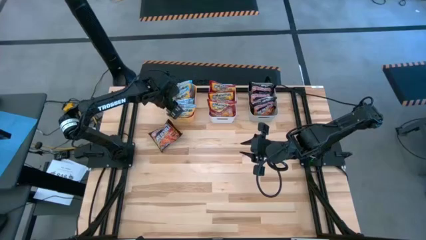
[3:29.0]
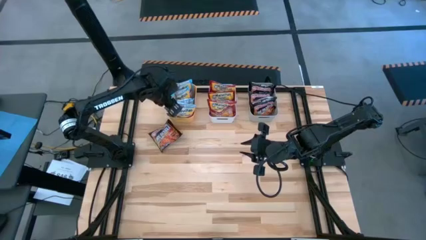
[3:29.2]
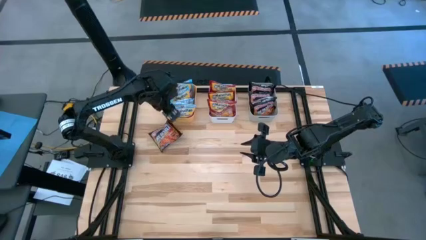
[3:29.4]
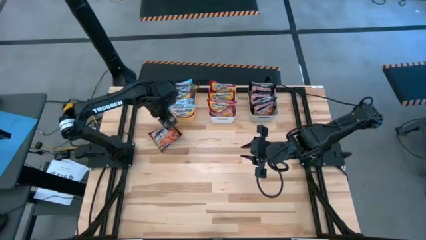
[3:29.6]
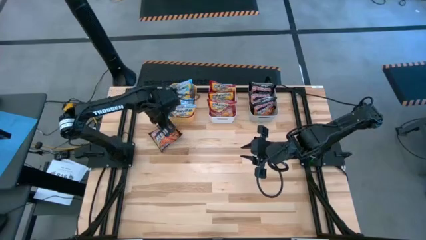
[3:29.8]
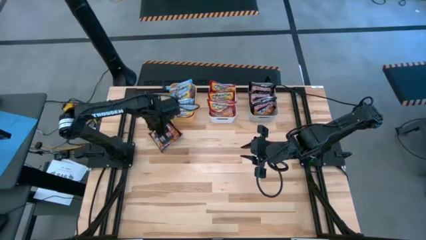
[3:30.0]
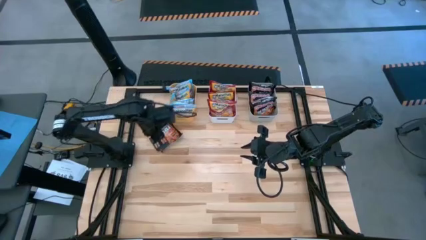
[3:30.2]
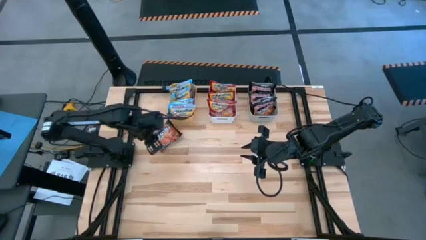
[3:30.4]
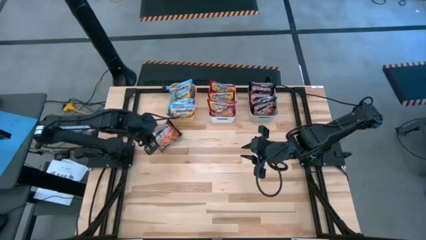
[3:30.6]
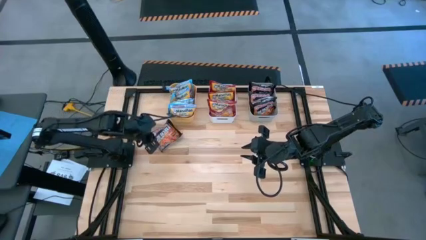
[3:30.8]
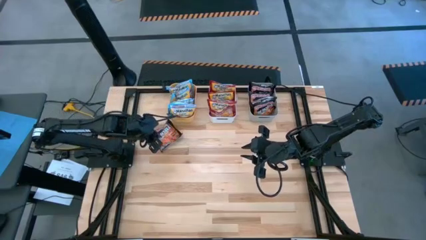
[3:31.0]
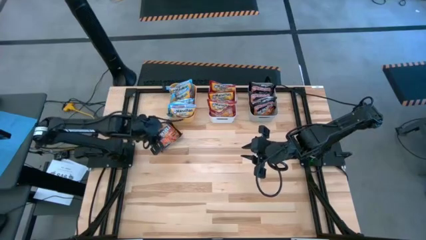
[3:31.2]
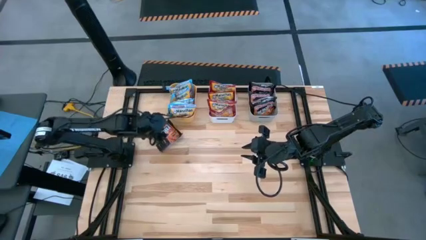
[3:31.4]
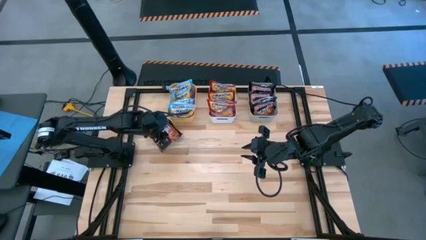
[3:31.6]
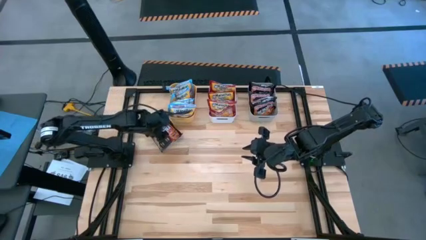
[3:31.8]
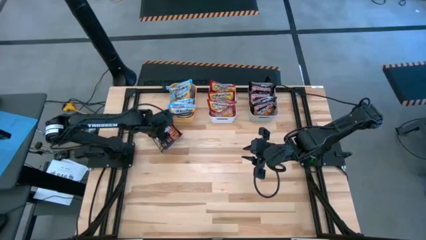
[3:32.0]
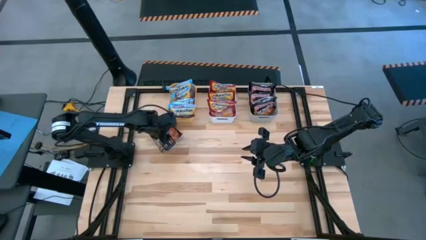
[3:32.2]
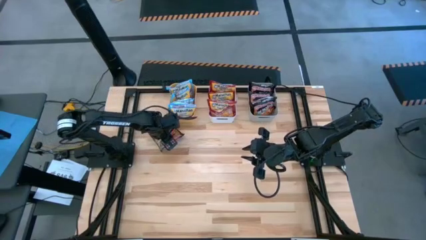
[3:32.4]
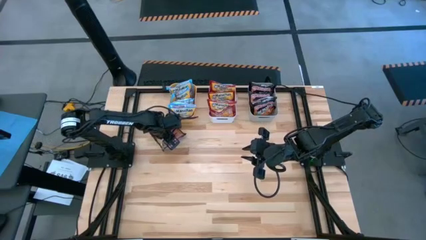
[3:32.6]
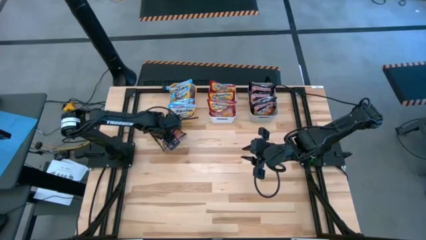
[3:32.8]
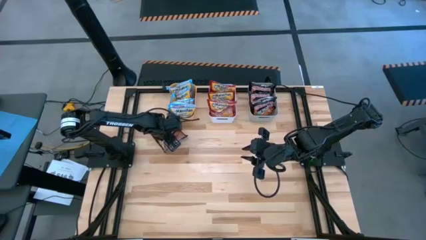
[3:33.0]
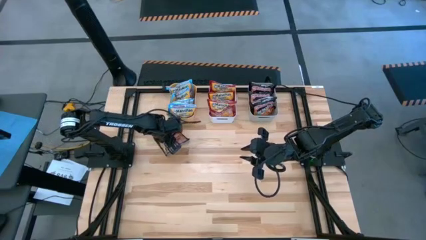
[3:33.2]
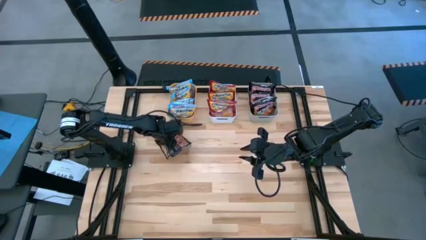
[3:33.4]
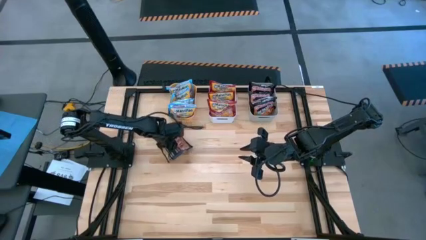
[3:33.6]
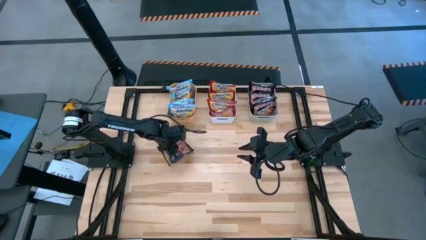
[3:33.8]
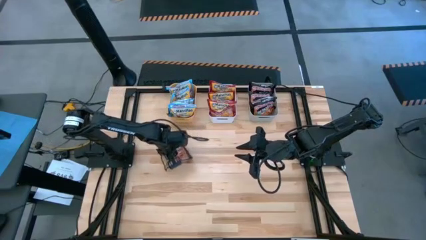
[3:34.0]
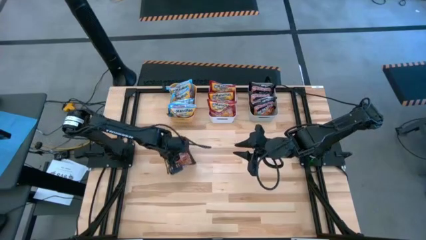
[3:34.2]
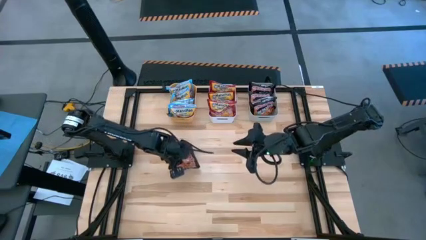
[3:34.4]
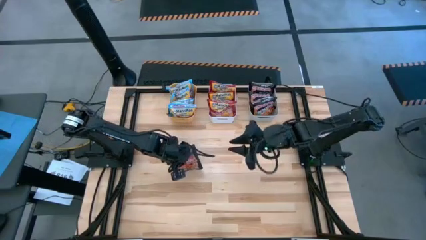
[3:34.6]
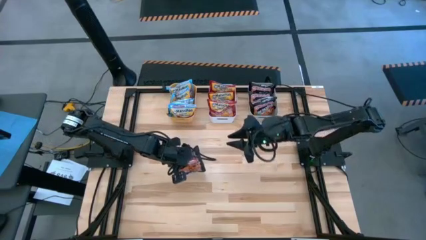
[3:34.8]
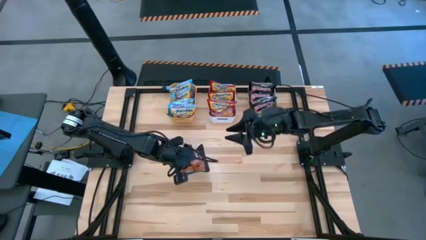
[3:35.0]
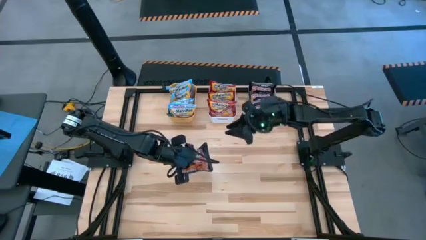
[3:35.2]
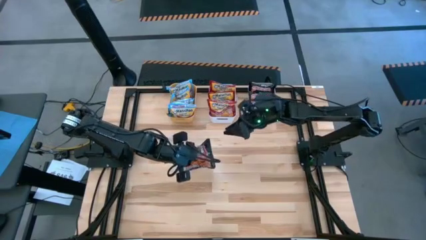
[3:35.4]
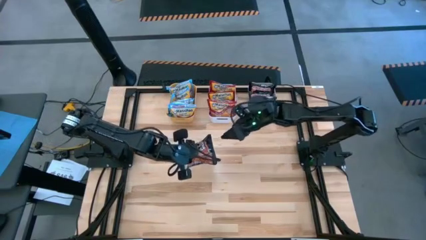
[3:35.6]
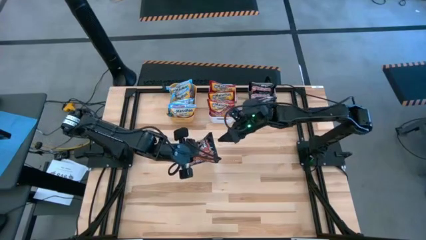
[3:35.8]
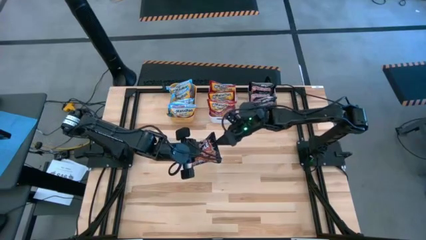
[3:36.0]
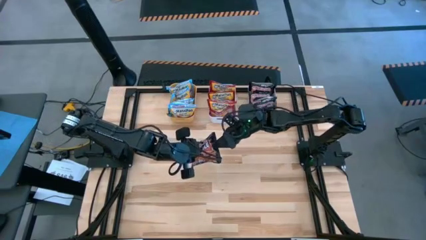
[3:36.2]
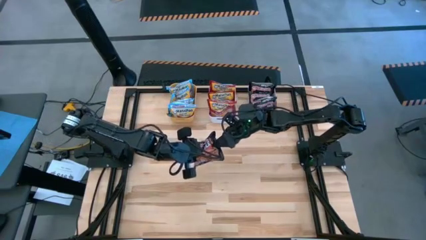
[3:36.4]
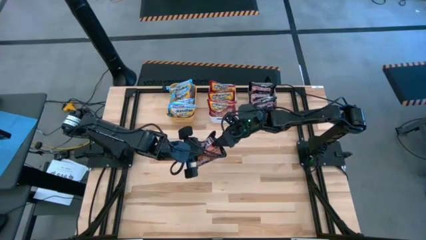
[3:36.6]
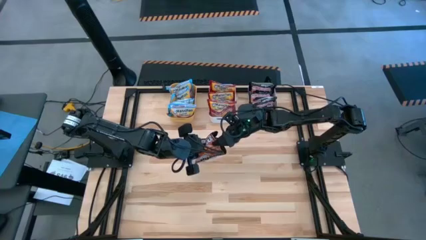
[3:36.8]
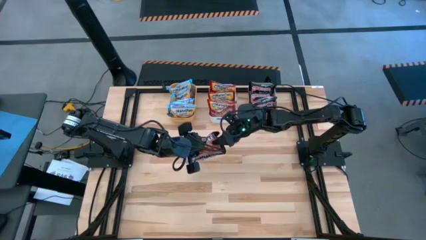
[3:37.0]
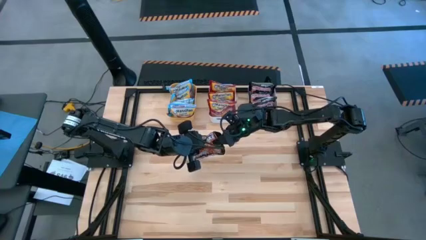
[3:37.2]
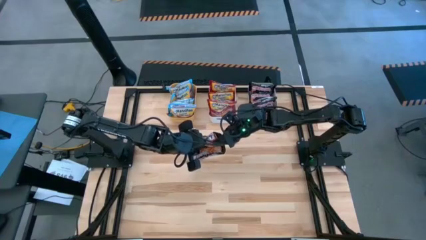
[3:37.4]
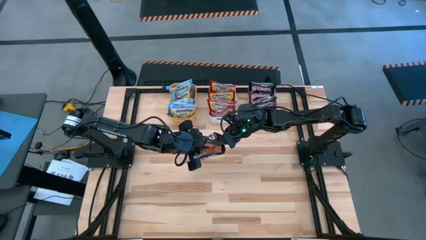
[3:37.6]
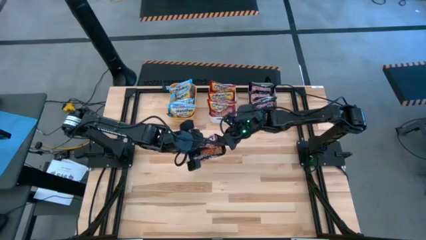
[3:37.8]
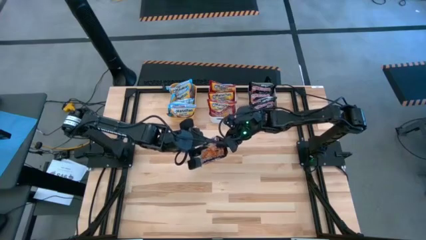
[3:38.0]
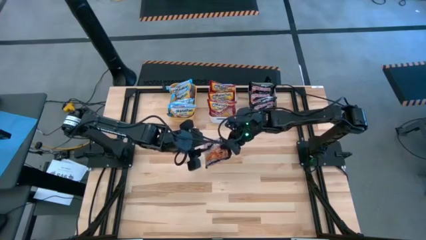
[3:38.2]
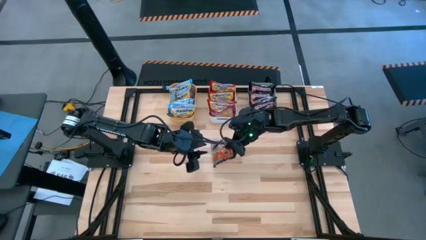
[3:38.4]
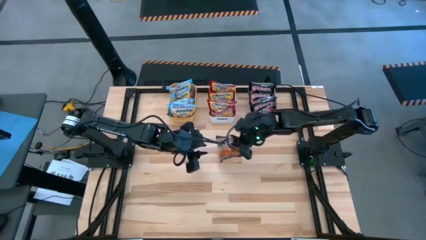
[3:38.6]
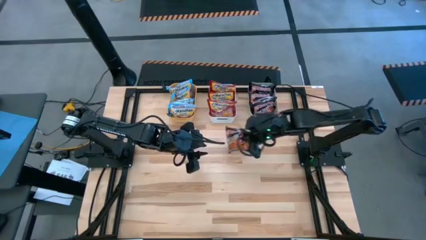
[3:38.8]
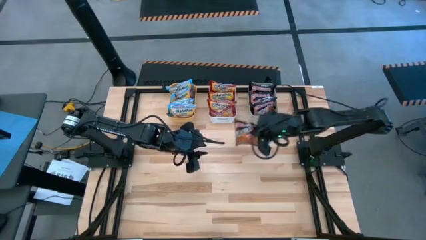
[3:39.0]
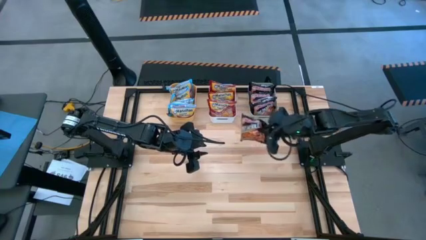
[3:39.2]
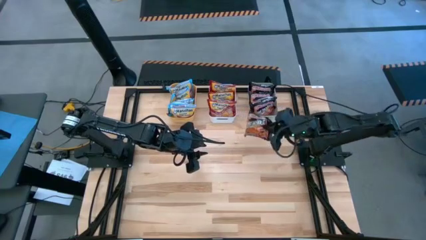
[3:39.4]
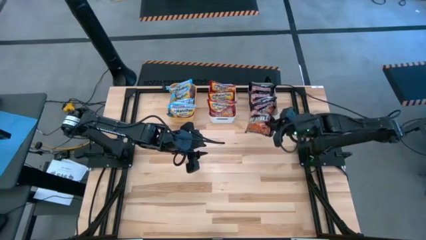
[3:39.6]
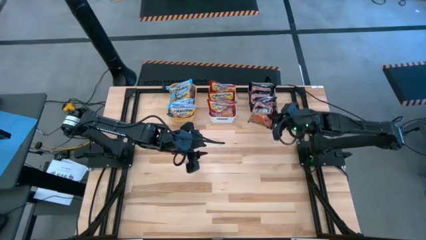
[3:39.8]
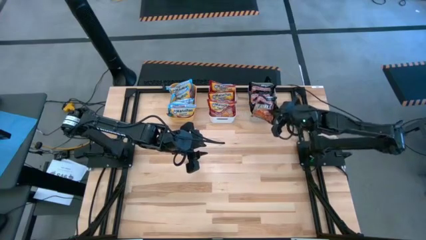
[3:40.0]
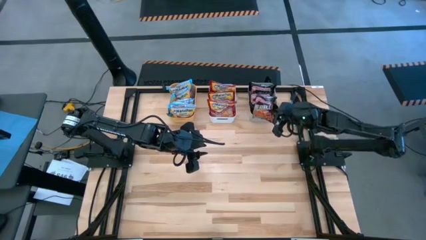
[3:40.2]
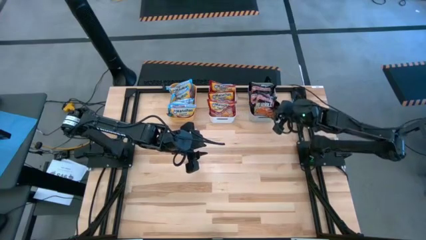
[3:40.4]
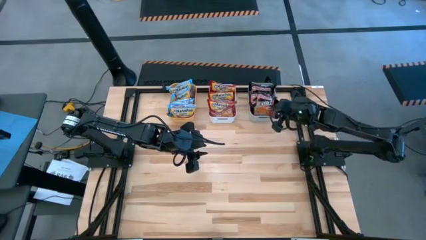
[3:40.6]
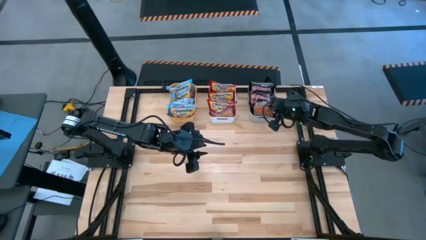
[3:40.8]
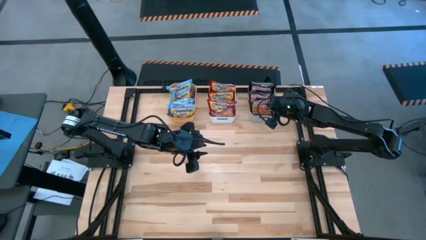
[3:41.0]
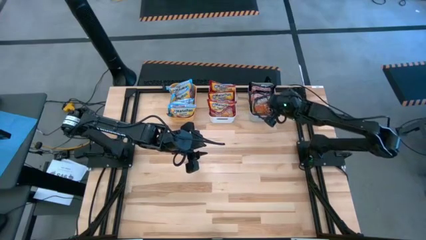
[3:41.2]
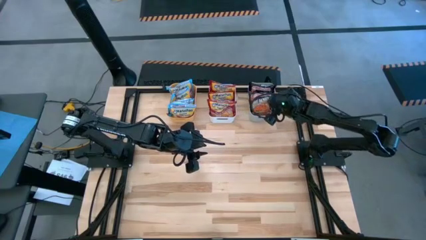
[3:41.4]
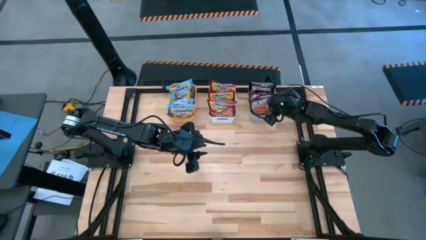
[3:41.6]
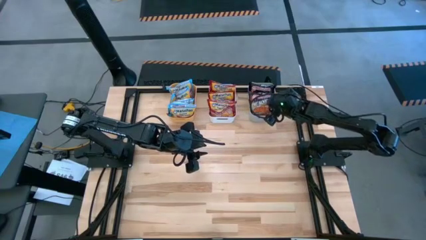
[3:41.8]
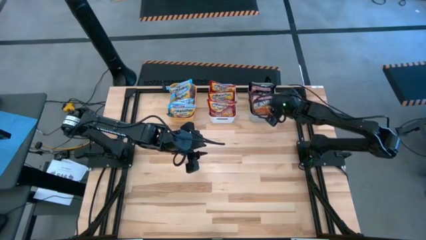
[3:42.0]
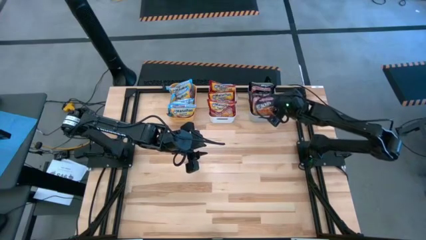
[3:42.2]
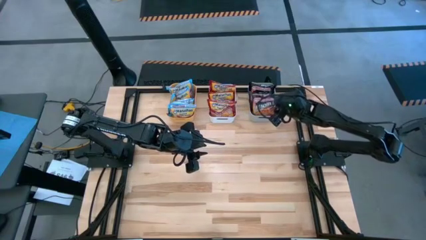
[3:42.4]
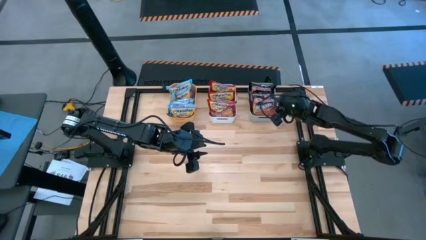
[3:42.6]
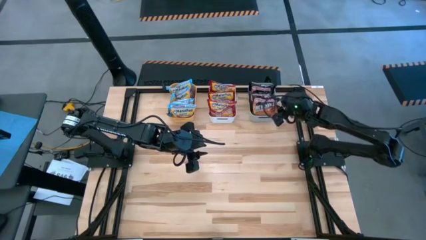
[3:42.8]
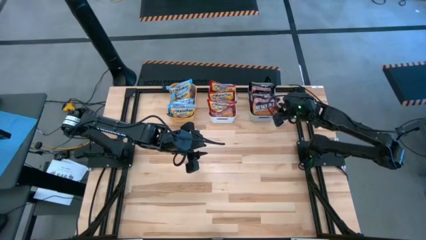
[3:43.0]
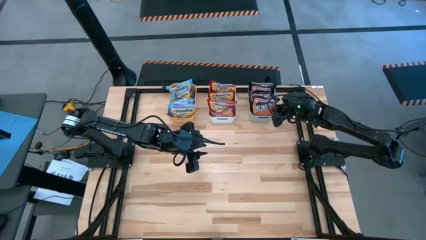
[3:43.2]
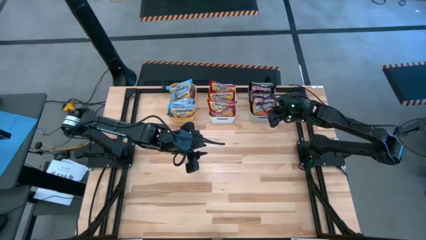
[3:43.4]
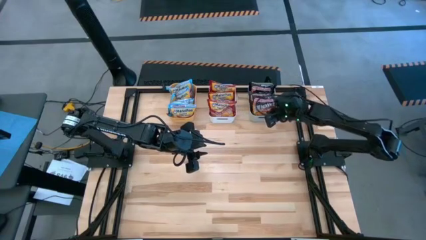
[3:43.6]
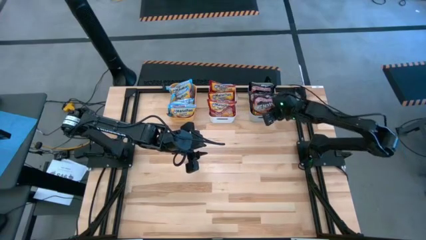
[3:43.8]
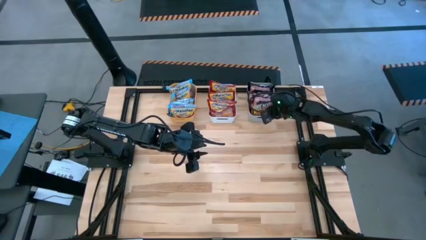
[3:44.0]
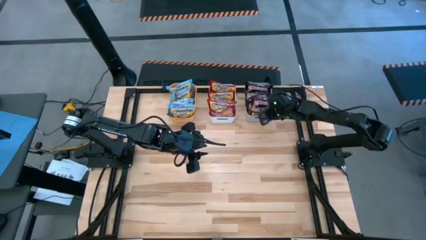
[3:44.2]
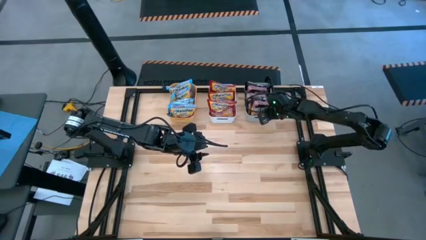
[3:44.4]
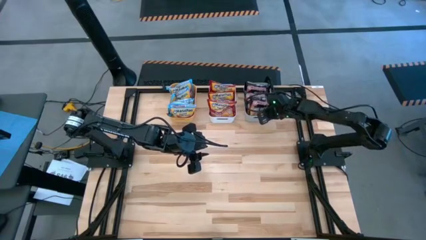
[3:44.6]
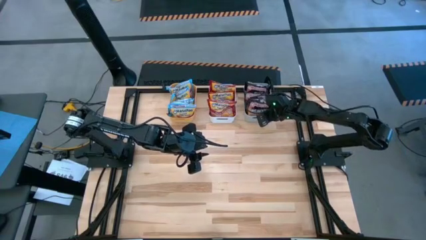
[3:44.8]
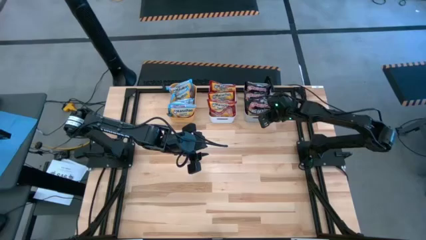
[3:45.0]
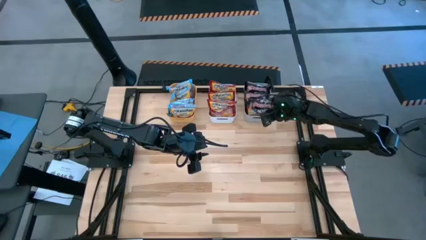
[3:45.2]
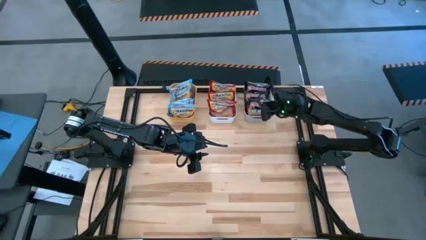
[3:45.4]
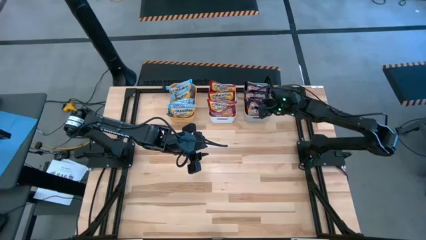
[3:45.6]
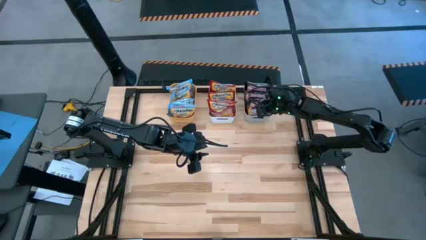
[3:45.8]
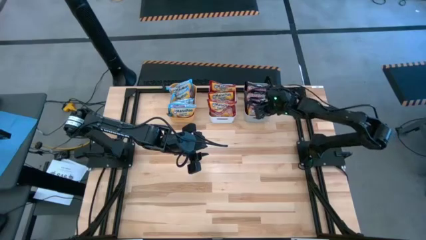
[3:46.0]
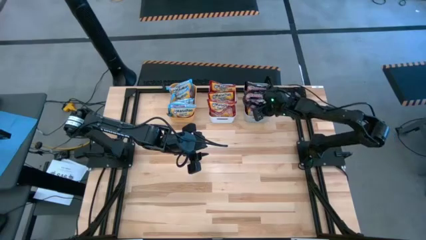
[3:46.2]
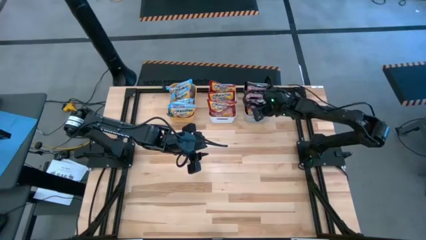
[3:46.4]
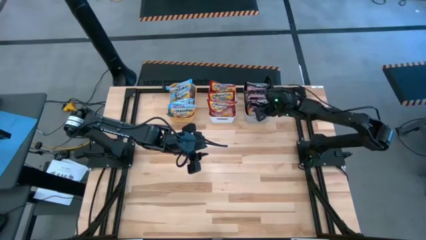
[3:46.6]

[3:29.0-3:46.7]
Task: Sort Maruchan noodles
Put the black noodle pack into the gray bin
